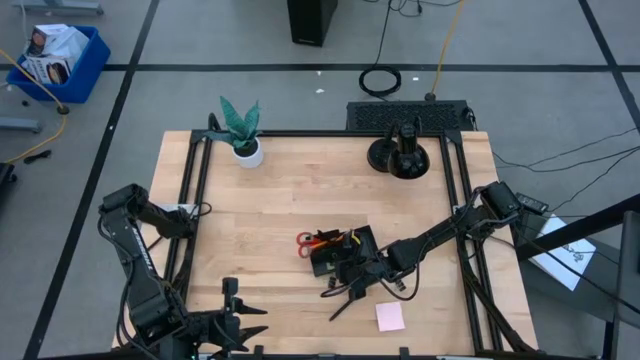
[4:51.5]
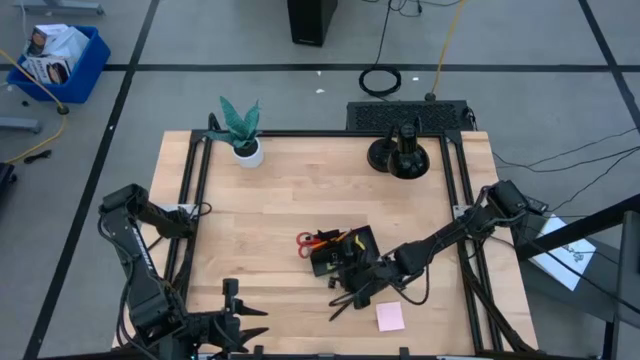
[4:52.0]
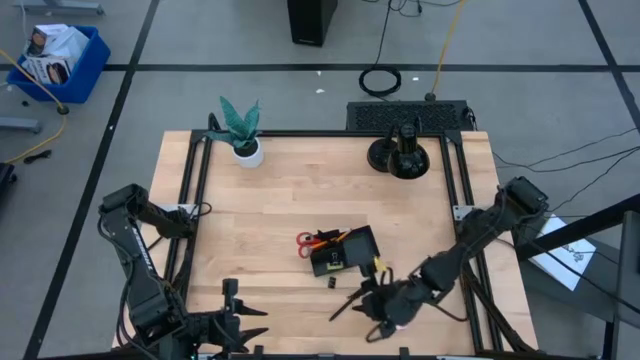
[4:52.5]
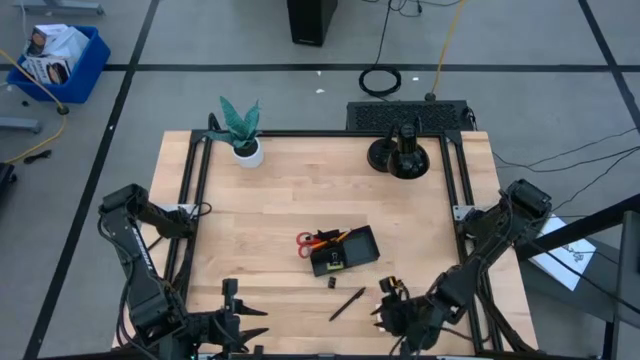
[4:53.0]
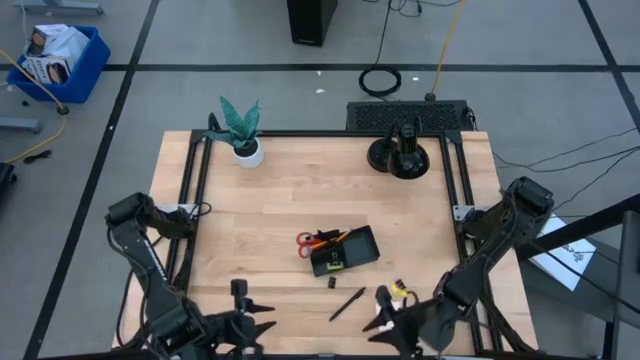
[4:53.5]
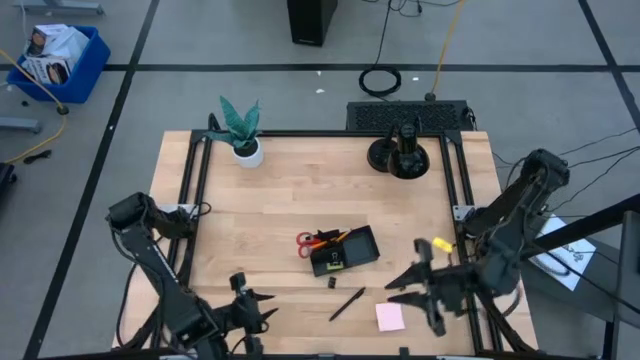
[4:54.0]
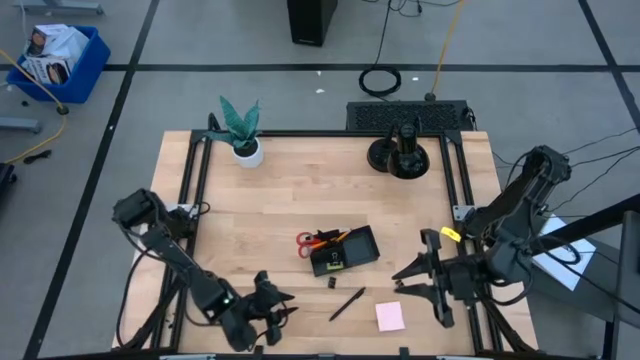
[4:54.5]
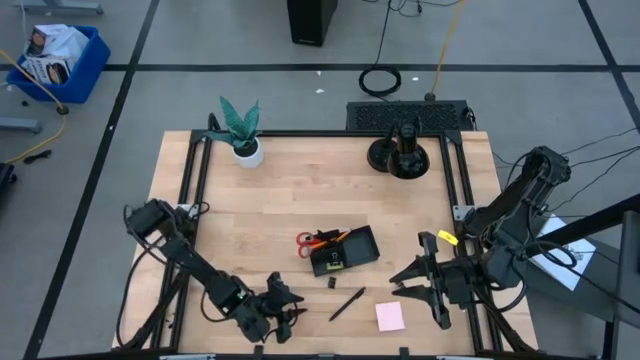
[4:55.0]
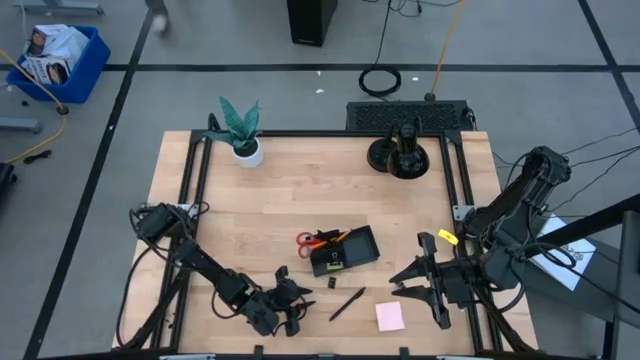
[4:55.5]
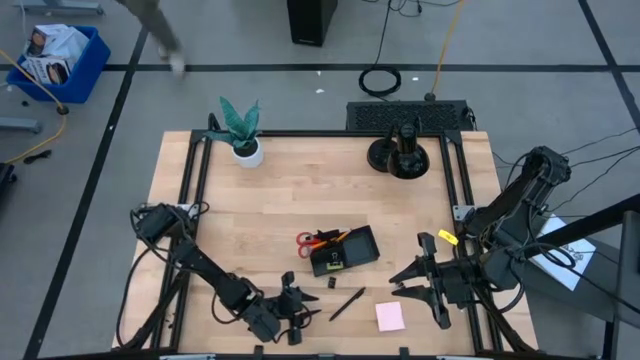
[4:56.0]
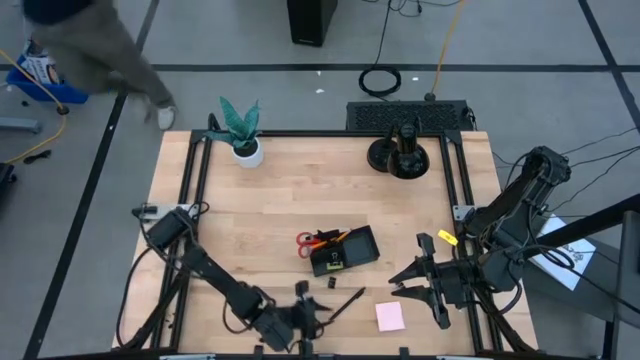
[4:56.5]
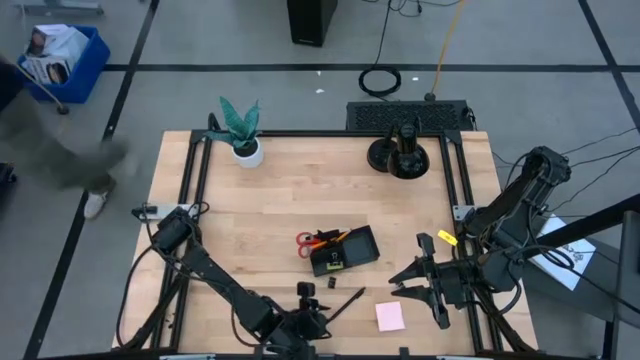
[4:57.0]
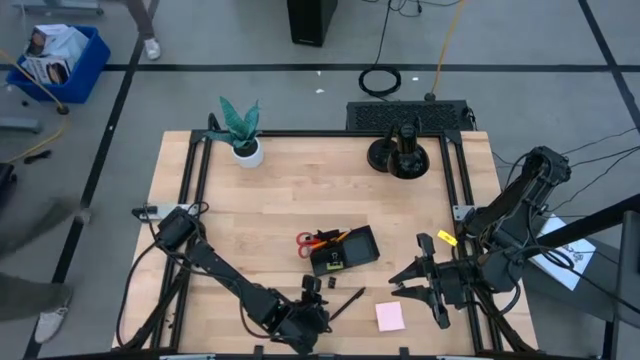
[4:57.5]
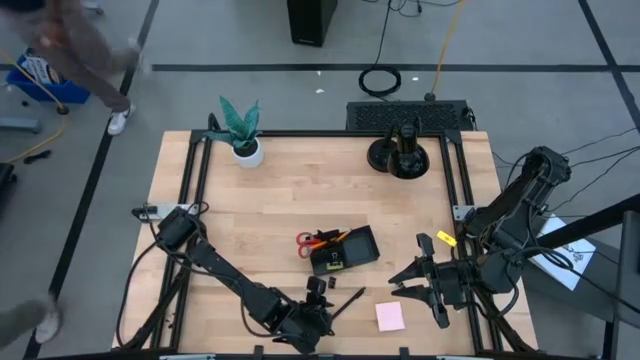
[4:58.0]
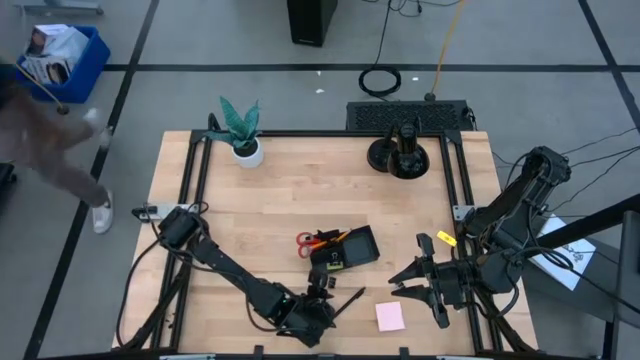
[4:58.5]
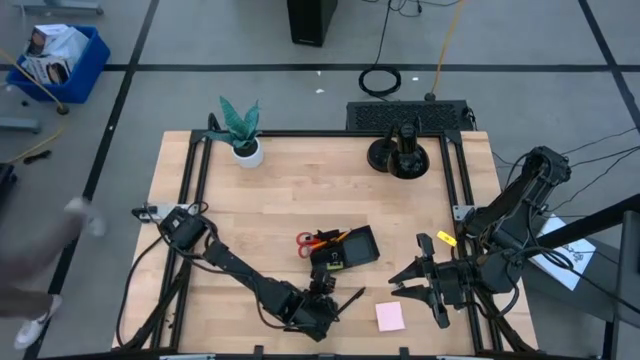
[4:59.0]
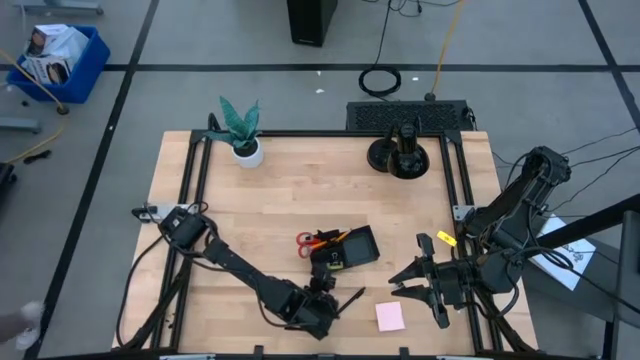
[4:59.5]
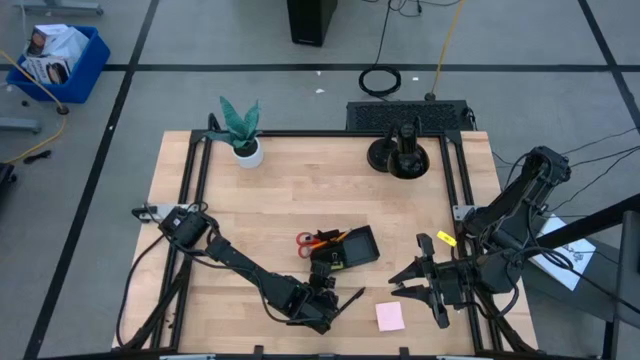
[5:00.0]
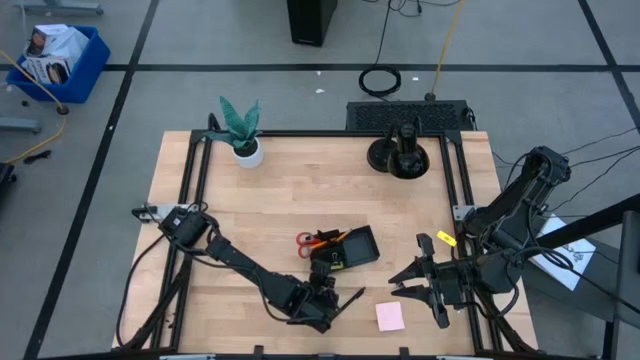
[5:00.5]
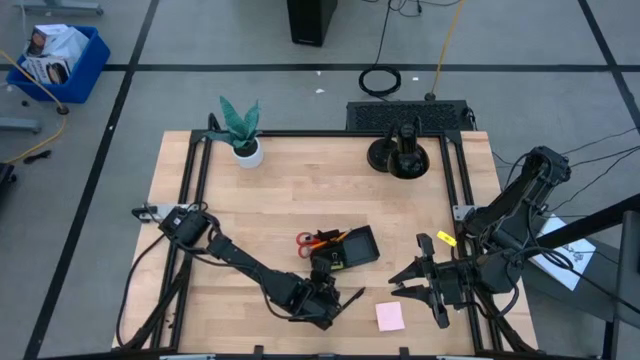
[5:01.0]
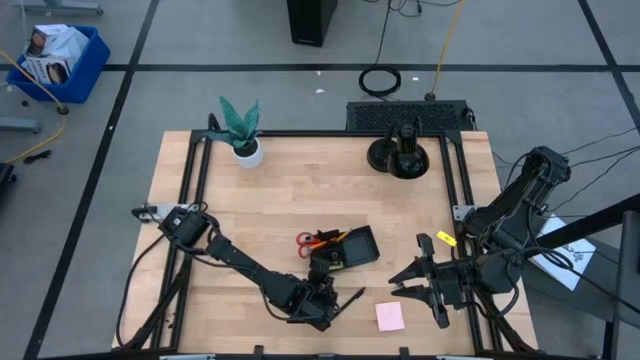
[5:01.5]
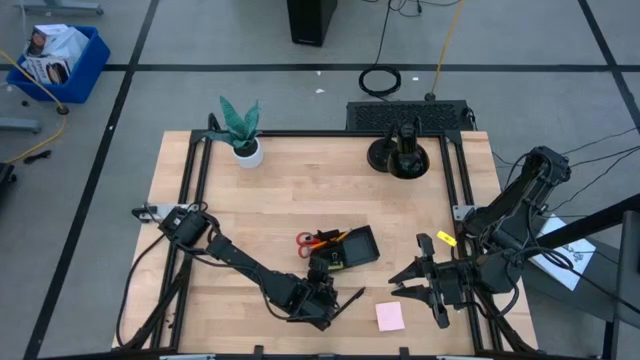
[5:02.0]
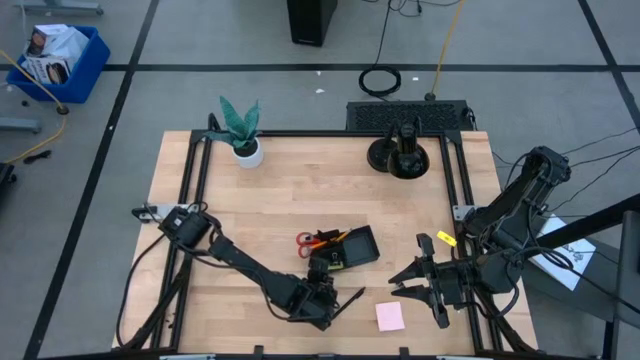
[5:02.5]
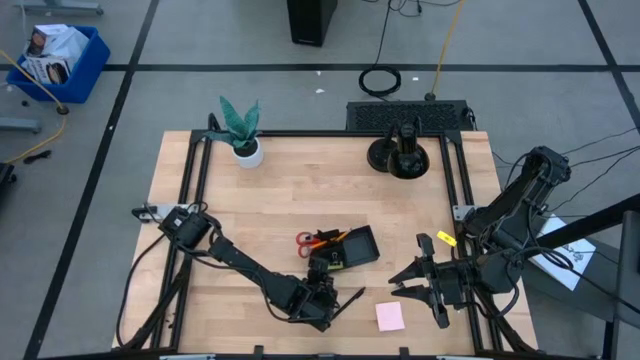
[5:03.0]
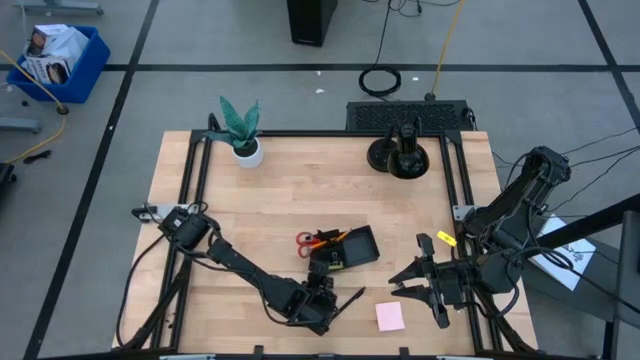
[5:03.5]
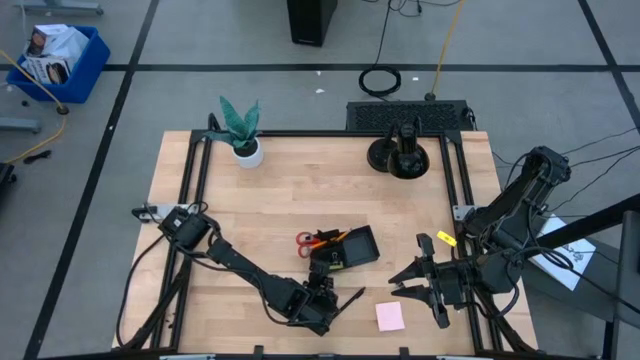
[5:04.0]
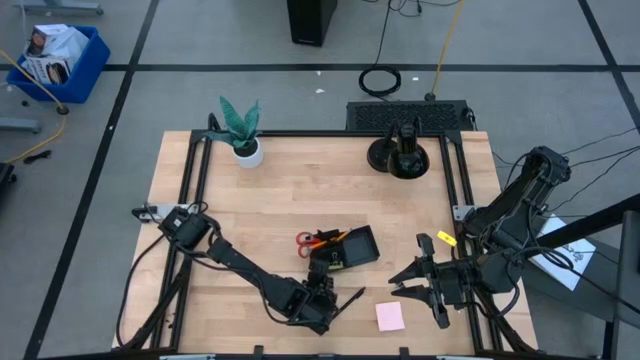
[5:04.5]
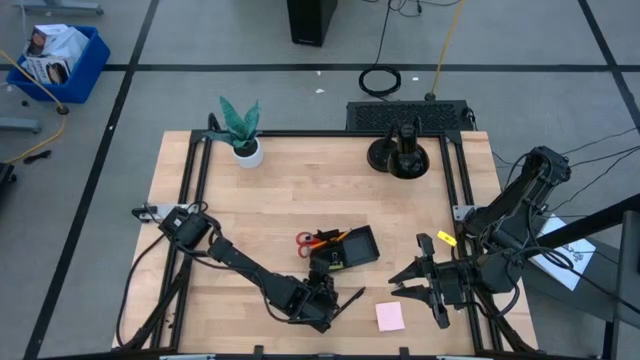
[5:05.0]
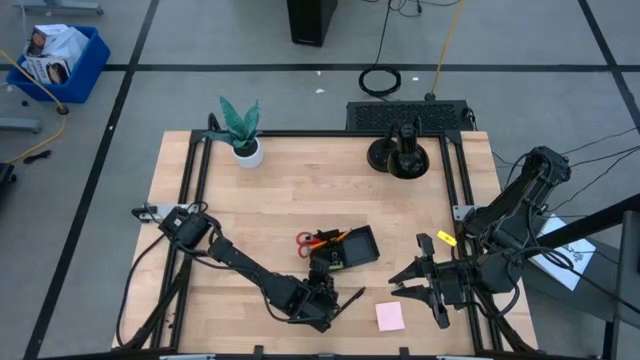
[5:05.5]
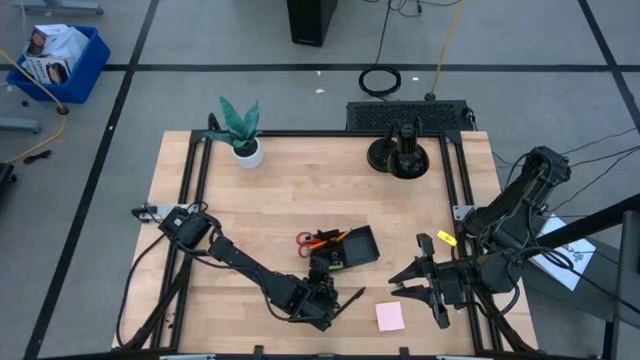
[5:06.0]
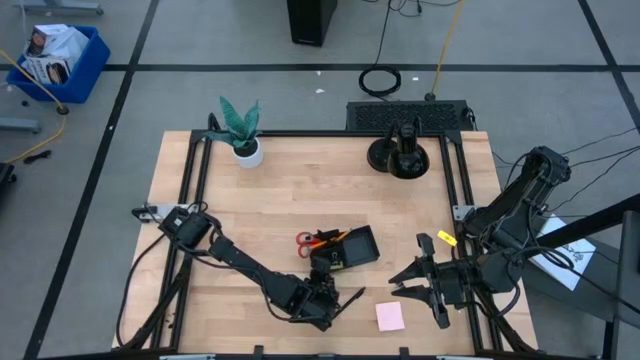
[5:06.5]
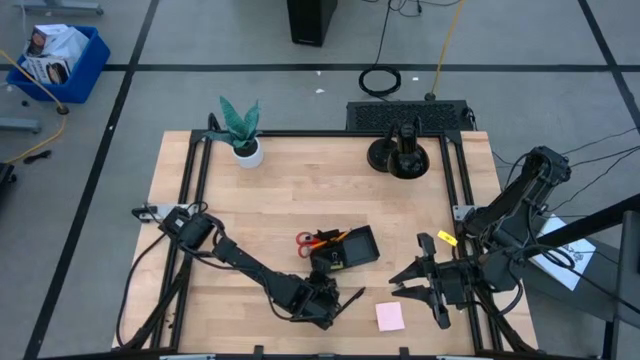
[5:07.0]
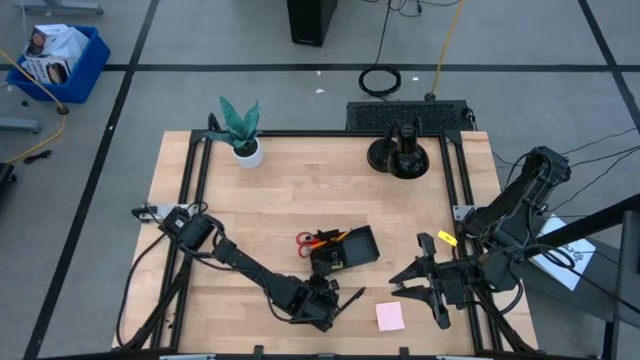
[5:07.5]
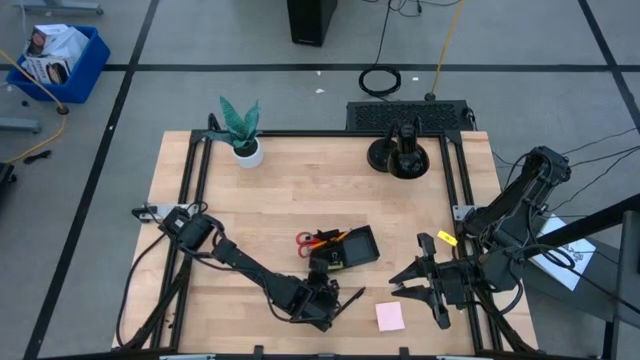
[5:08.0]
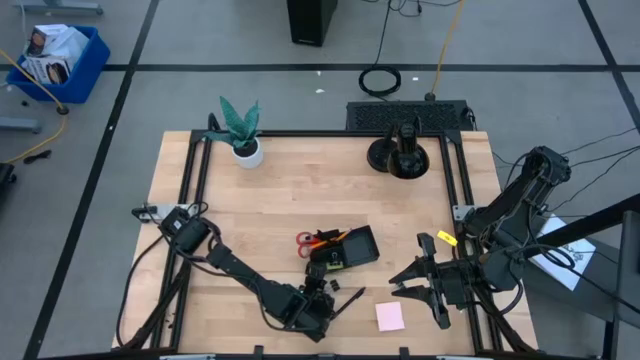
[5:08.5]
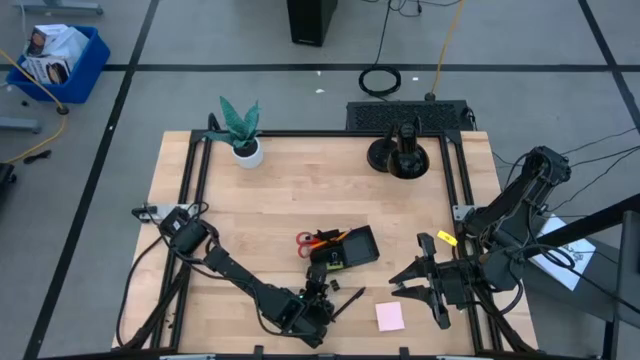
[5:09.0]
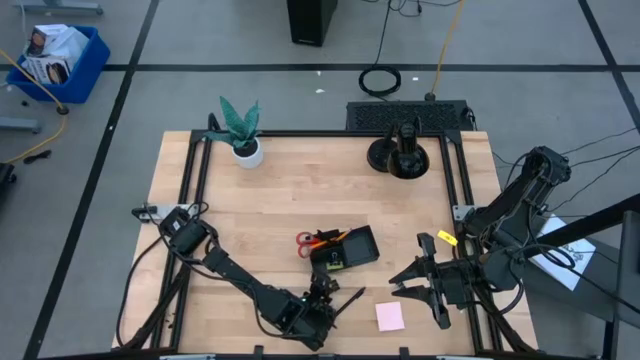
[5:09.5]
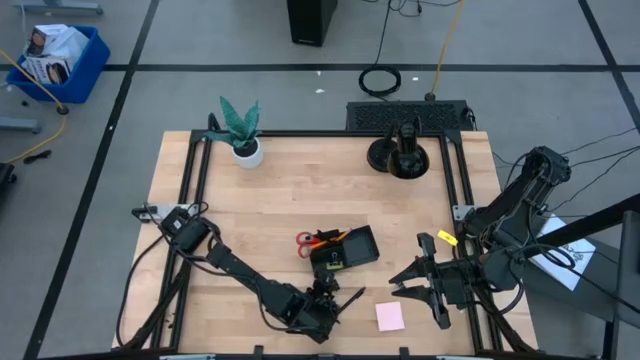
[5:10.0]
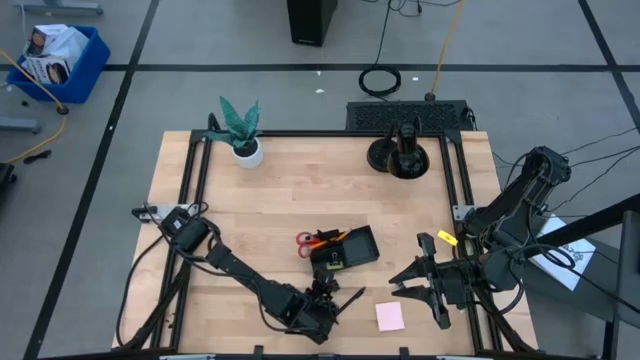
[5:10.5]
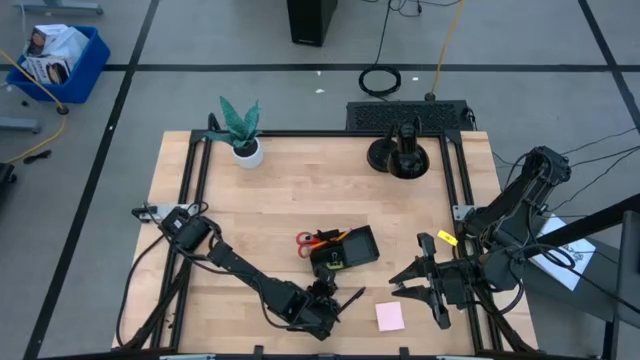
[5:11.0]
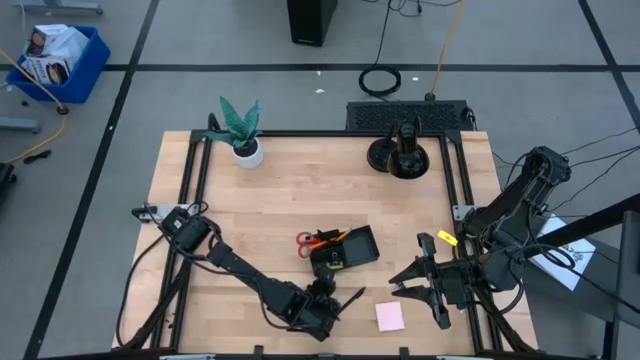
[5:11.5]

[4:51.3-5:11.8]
Task: Pick and place office supplies into organizer
Put the left black binder clip into the black desk organizer

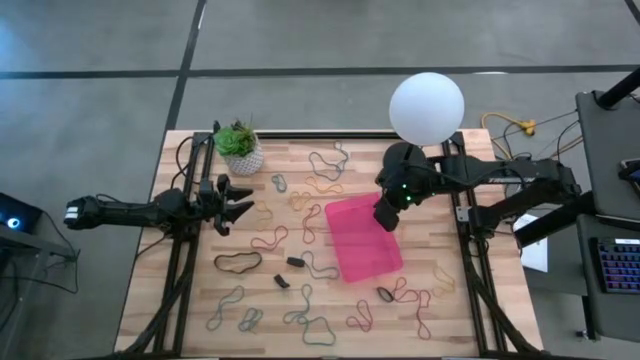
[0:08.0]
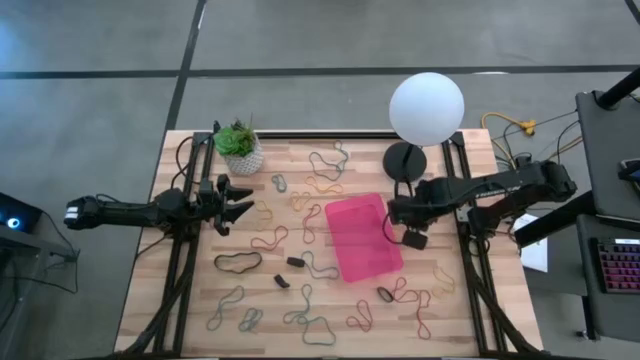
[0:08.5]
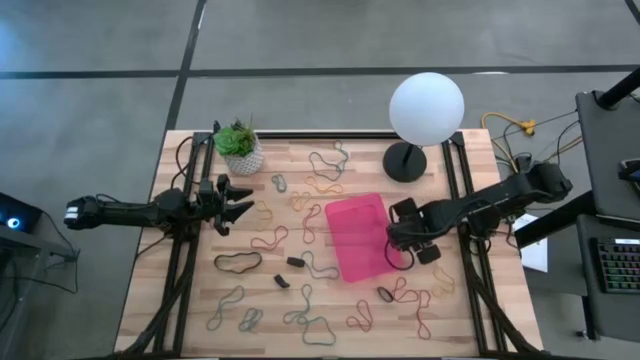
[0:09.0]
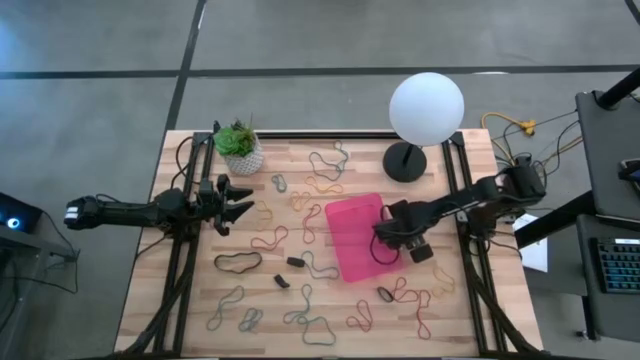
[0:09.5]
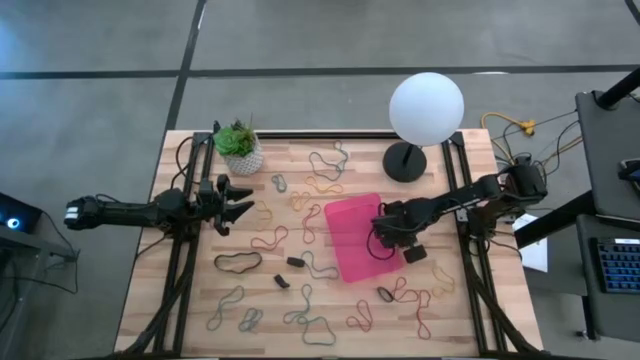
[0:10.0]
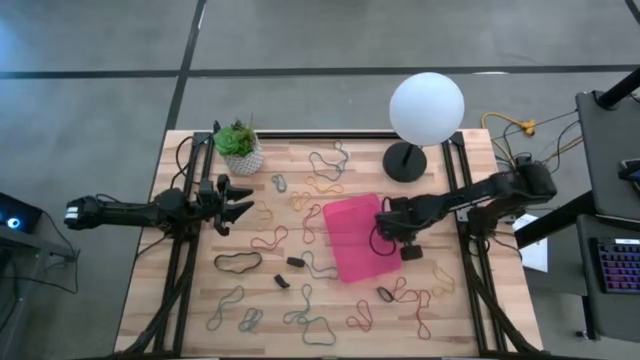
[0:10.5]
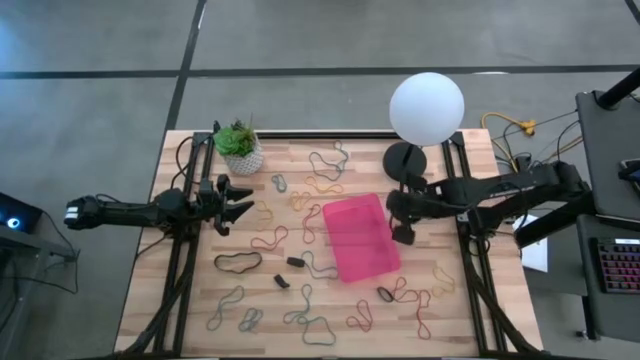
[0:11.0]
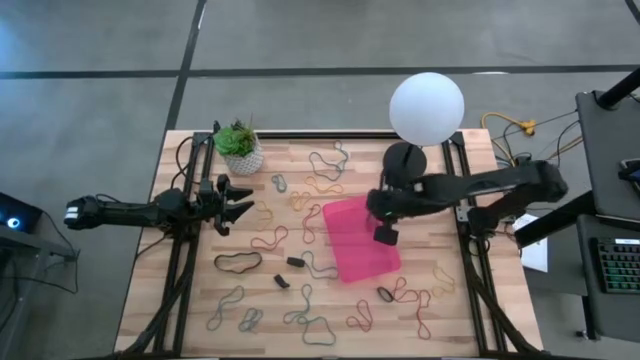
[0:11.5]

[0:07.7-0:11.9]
Task: Pick and place rubber bands into bin
Put the yellow rubber band into the pink bin
